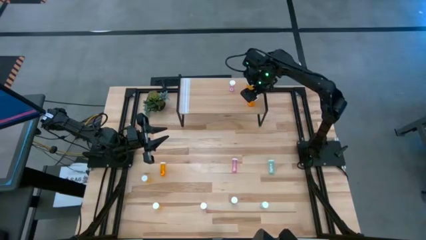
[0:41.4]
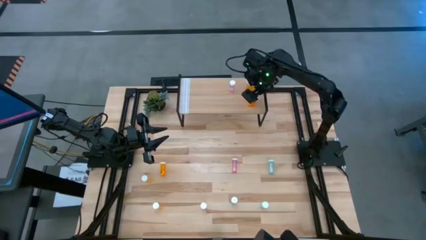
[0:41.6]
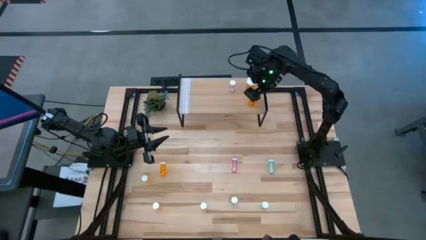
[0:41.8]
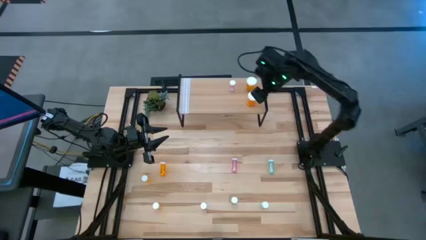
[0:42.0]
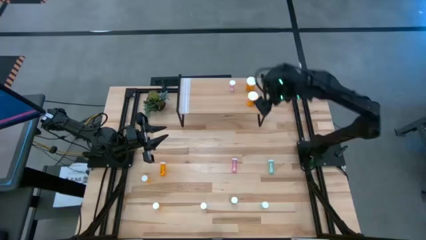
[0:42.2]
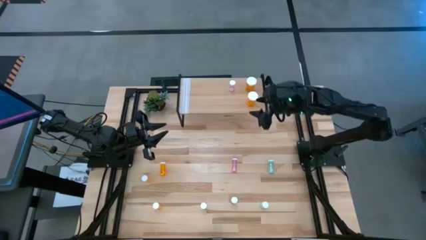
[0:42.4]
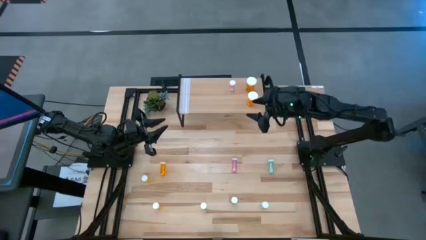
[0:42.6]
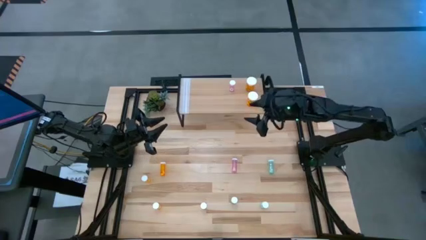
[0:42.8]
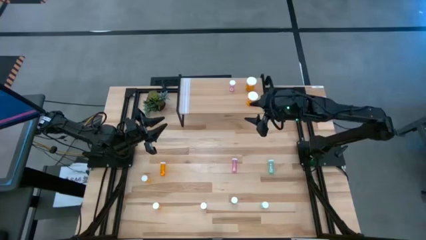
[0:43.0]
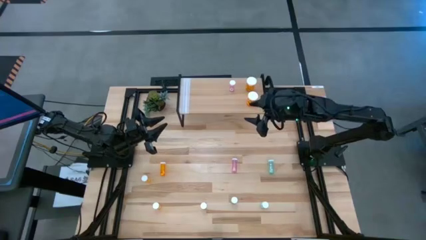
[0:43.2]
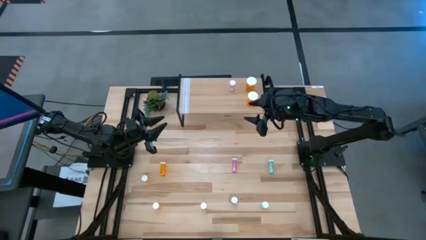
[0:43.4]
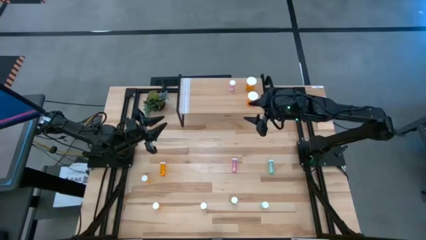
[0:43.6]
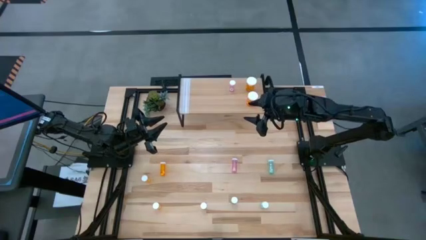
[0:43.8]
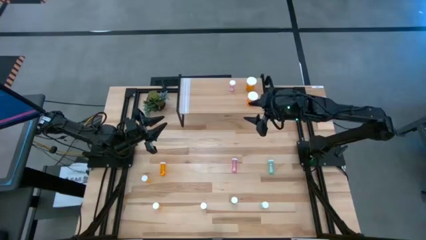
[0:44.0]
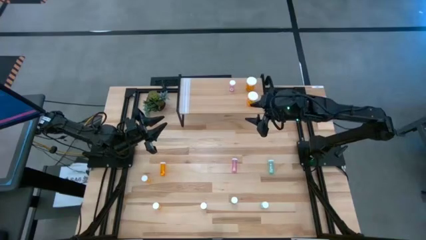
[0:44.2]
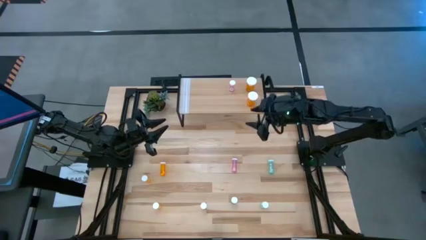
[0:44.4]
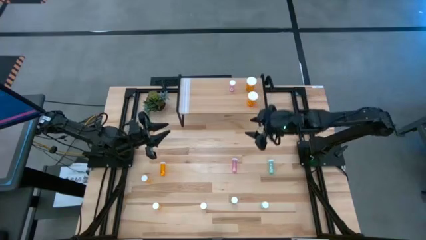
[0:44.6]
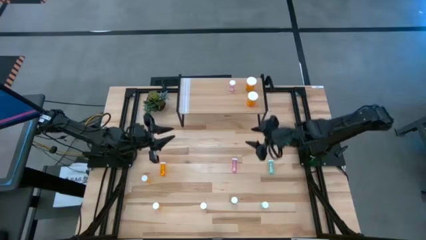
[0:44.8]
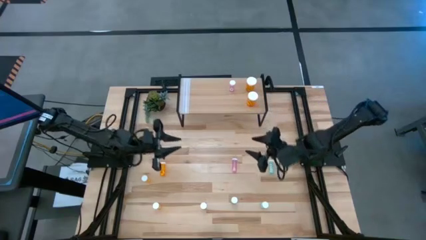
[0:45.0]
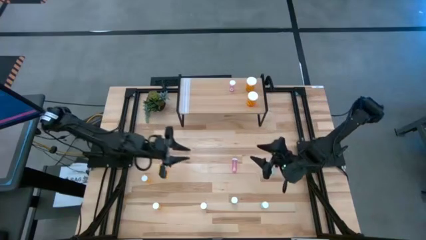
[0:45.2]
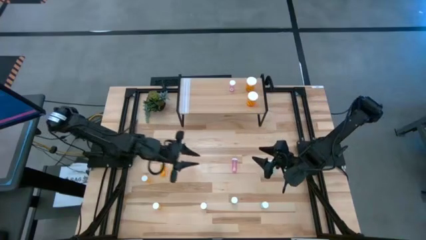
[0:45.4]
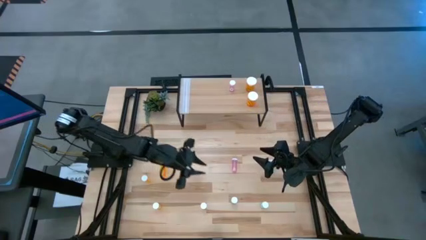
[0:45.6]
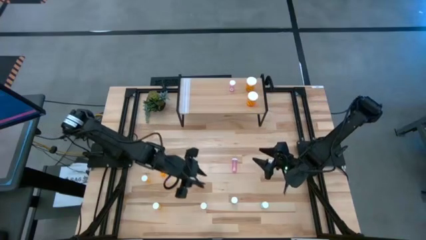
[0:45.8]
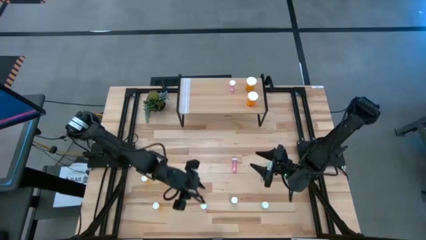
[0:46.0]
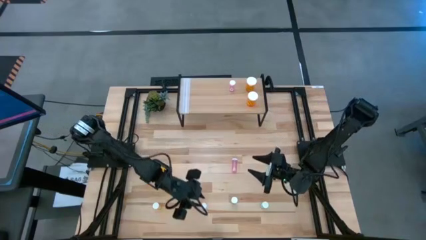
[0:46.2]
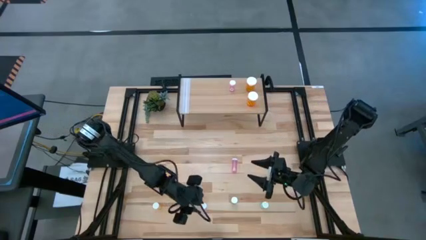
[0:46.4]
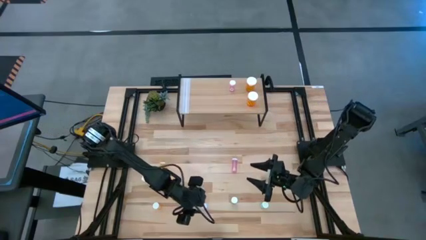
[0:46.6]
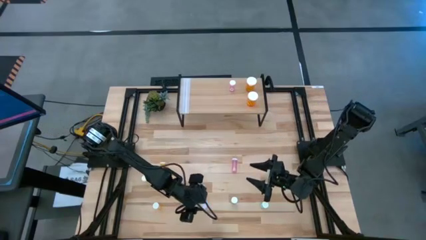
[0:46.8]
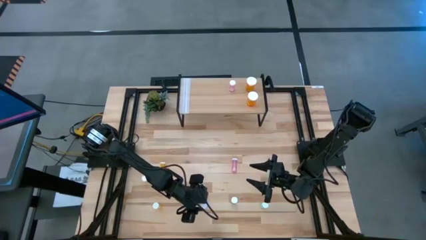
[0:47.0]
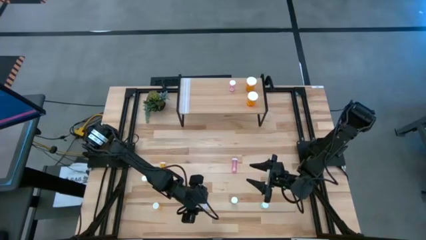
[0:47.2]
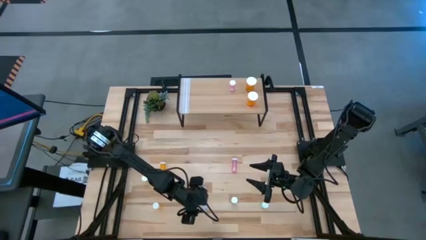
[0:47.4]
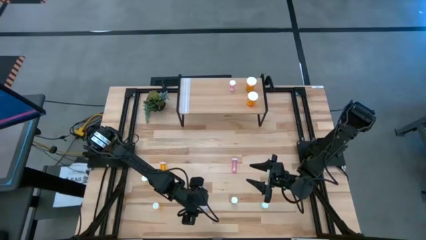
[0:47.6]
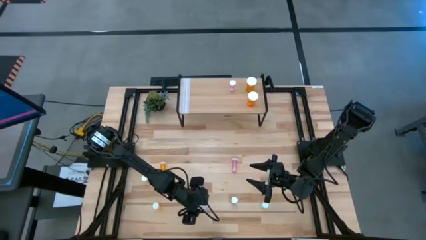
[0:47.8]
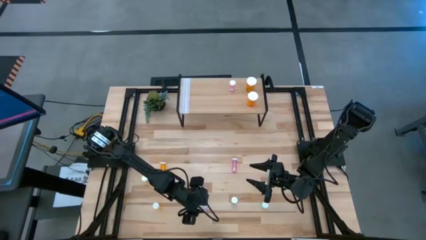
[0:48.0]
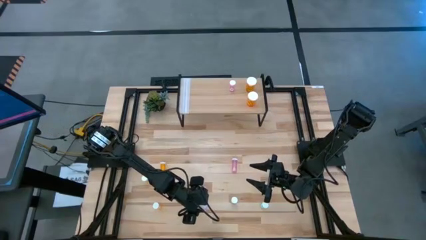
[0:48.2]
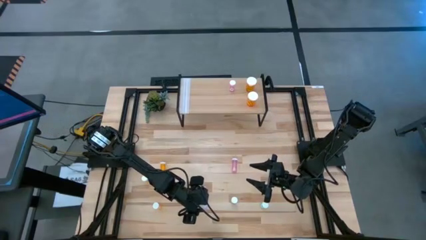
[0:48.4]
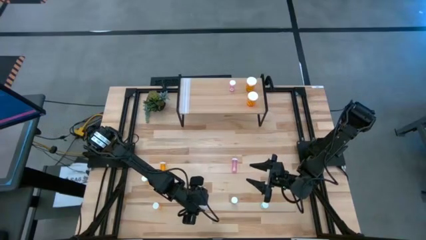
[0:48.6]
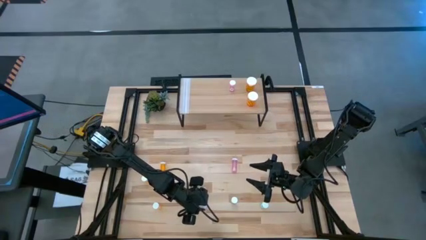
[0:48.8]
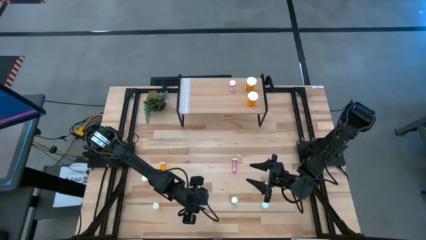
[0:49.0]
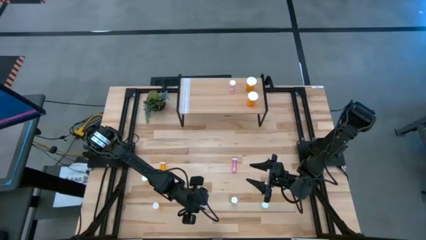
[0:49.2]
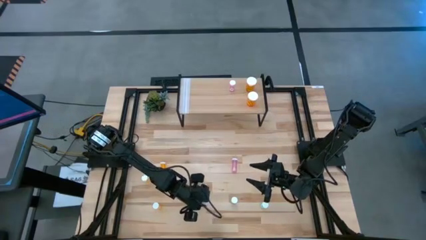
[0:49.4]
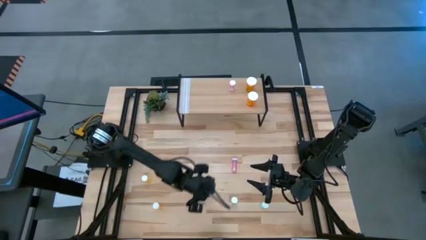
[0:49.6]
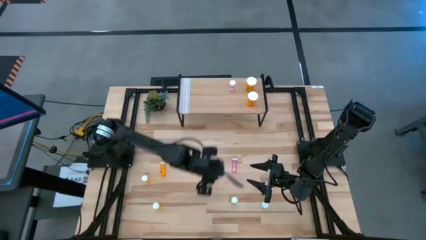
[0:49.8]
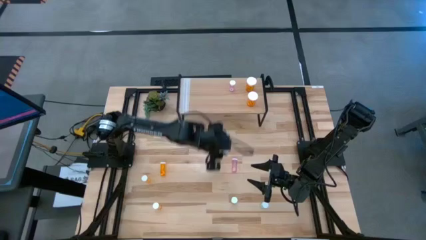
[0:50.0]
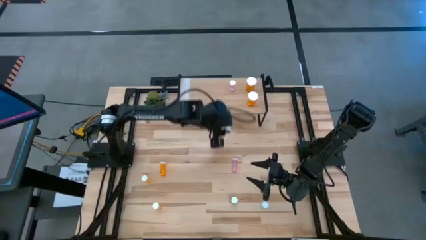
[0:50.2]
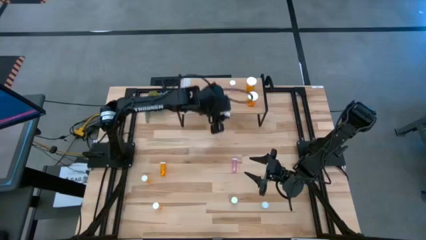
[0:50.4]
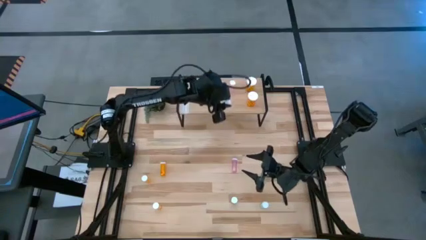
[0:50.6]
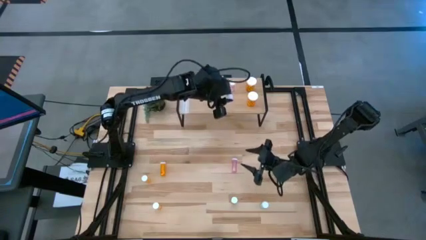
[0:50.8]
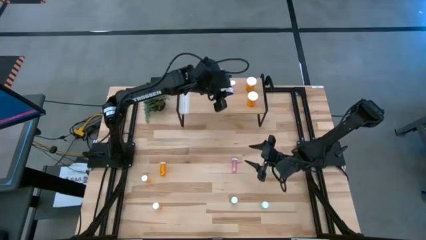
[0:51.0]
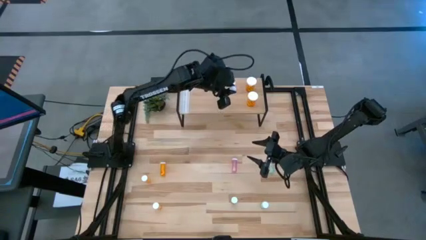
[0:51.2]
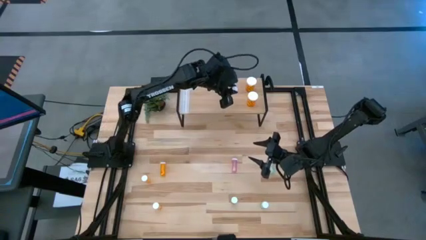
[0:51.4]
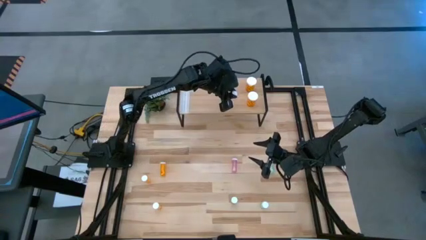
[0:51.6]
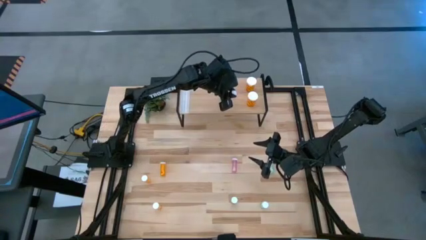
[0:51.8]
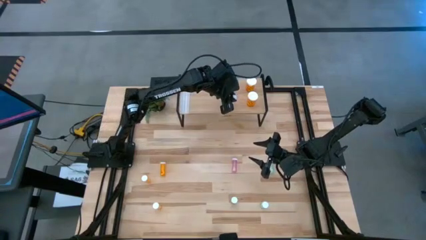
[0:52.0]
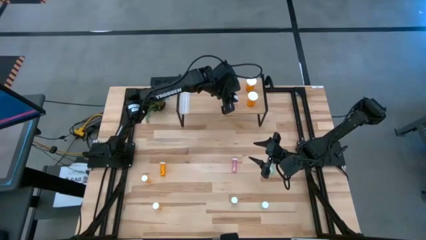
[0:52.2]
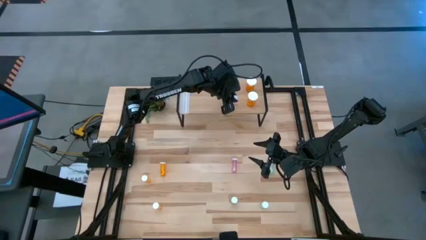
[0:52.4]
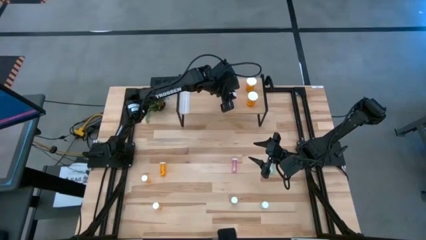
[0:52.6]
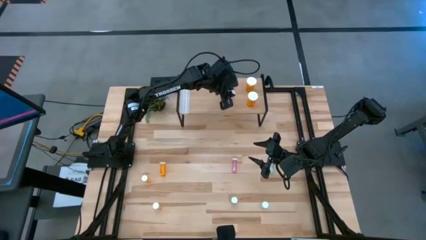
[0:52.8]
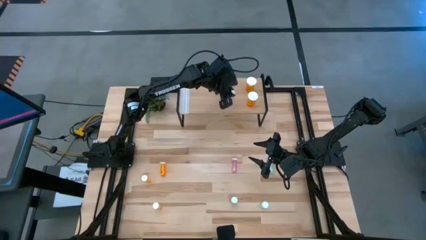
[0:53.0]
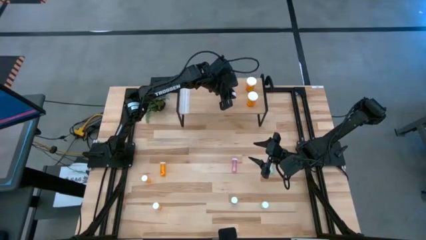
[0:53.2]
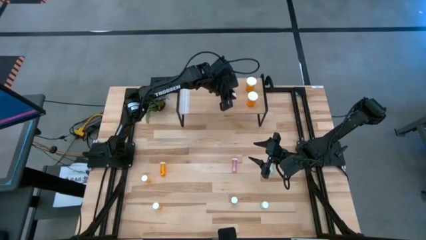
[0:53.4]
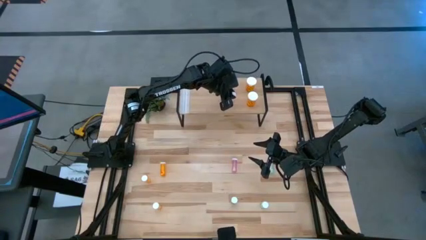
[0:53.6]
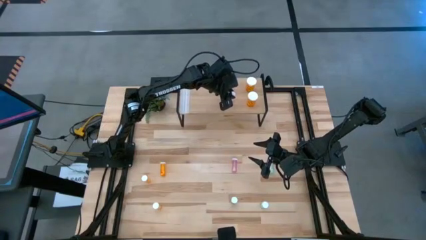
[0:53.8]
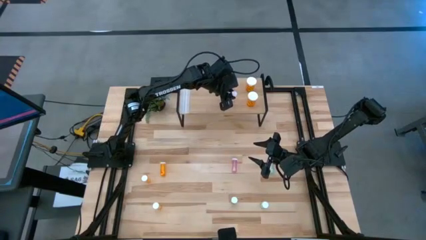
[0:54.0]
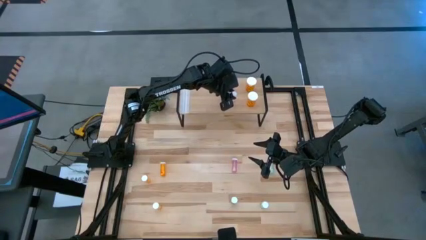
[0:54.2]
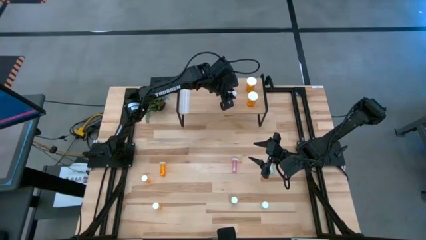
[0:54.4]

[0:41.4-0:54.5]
Task: Pick and place medicine bottles onto shelf by color
Put the bottom pink pill bottle on the shelf aligned with the other pink pill bottle
